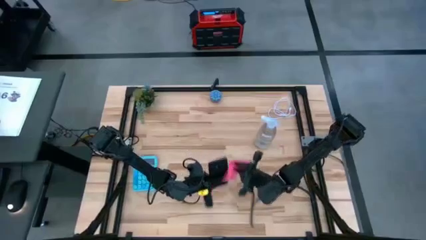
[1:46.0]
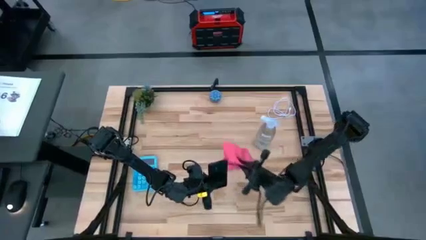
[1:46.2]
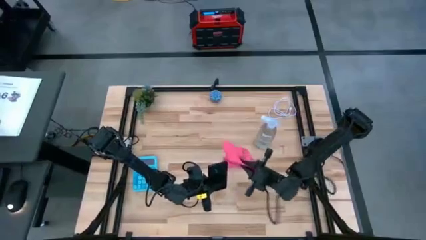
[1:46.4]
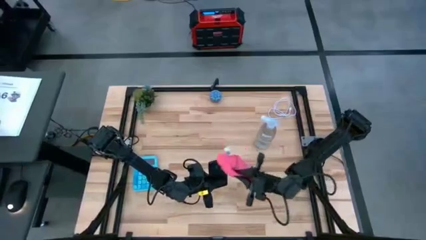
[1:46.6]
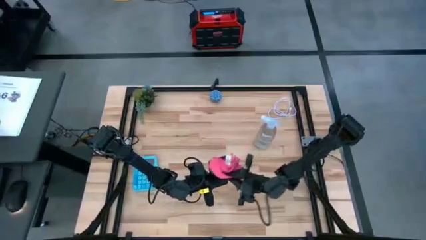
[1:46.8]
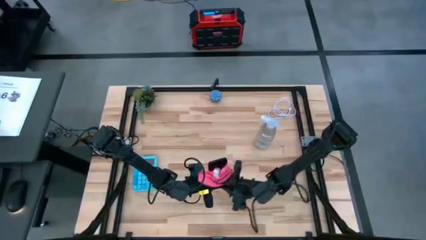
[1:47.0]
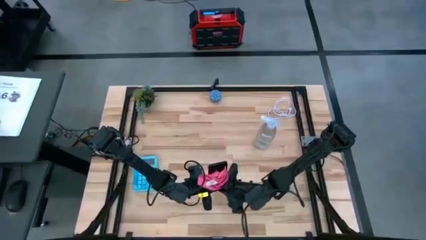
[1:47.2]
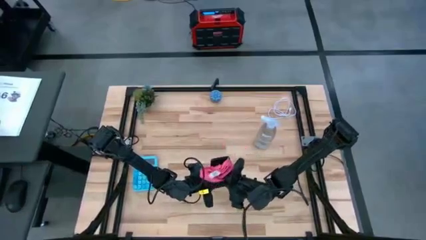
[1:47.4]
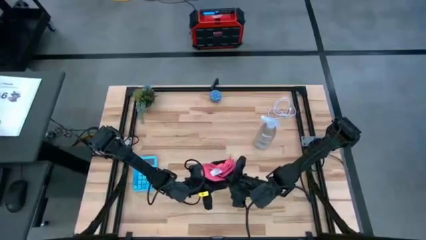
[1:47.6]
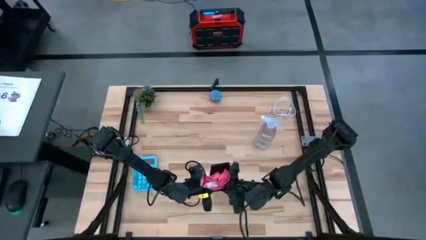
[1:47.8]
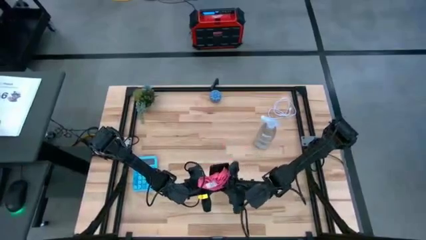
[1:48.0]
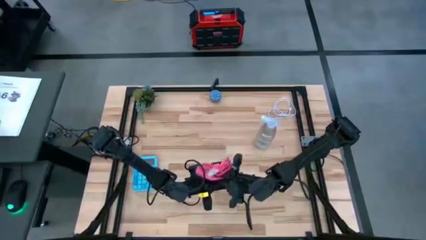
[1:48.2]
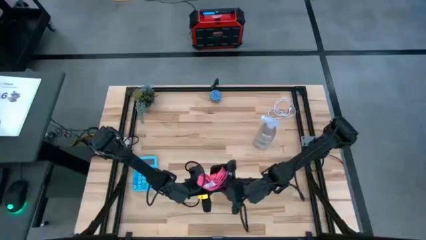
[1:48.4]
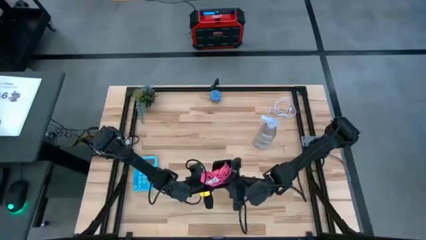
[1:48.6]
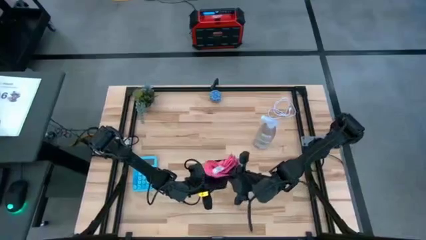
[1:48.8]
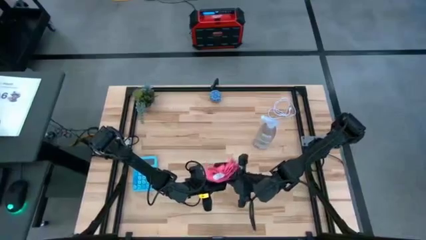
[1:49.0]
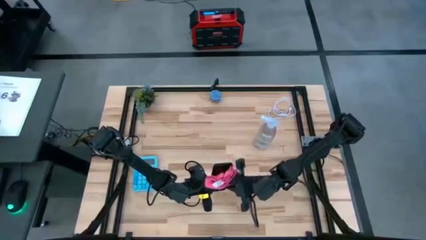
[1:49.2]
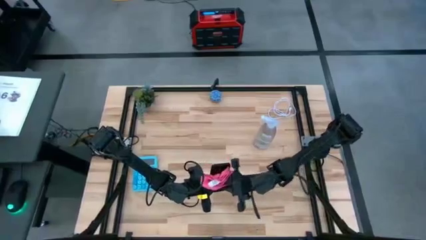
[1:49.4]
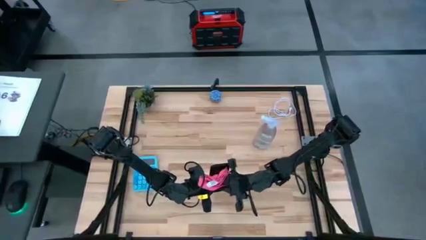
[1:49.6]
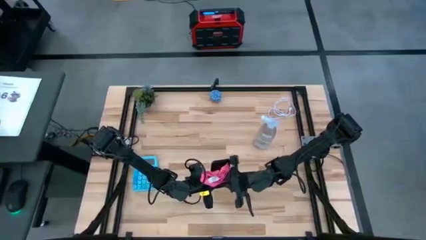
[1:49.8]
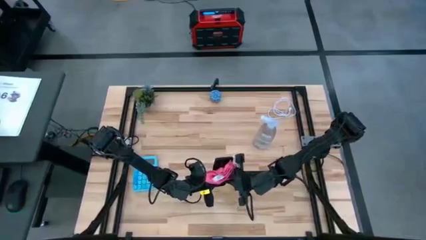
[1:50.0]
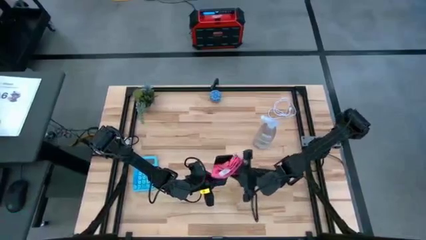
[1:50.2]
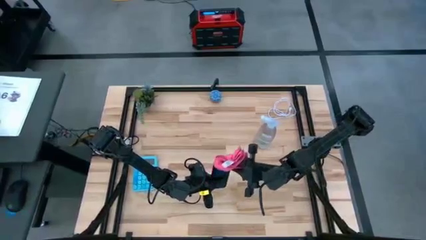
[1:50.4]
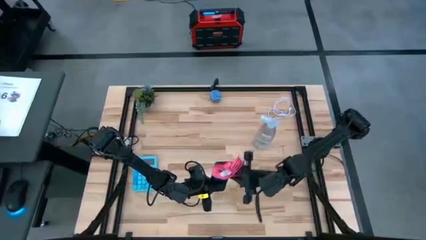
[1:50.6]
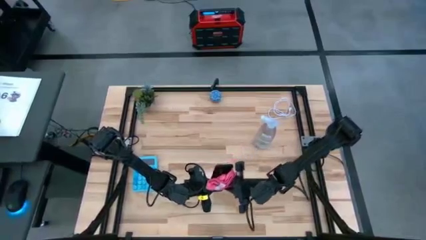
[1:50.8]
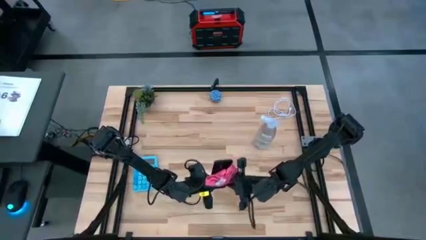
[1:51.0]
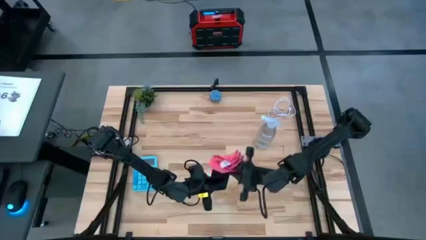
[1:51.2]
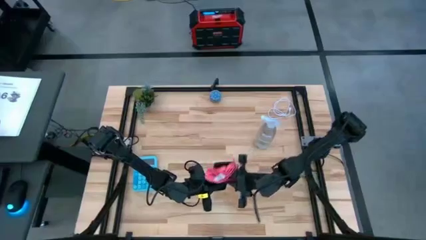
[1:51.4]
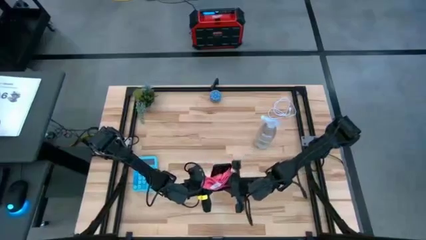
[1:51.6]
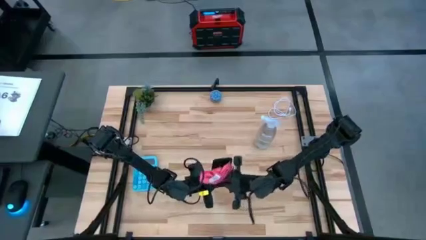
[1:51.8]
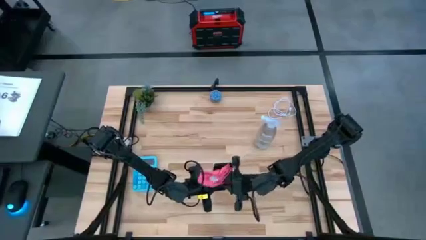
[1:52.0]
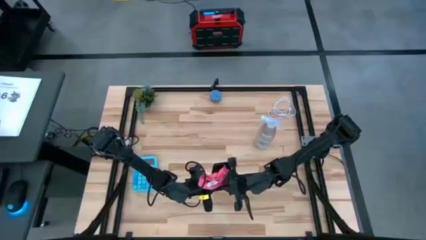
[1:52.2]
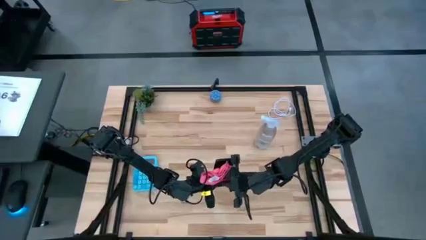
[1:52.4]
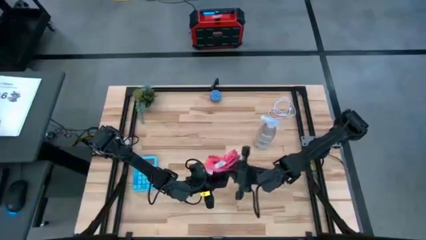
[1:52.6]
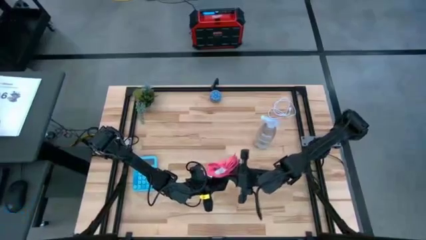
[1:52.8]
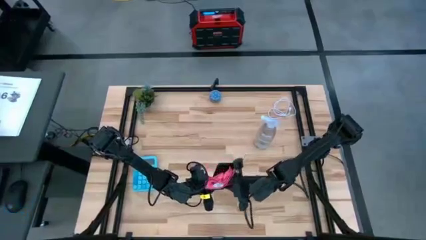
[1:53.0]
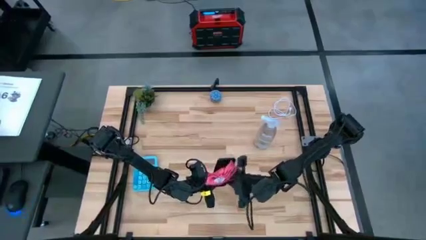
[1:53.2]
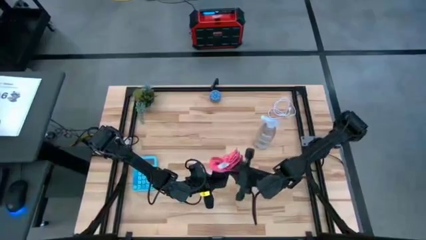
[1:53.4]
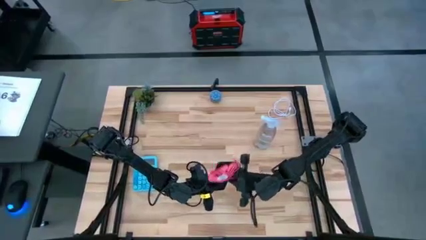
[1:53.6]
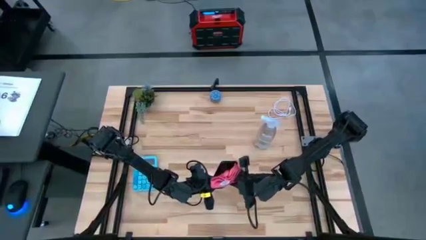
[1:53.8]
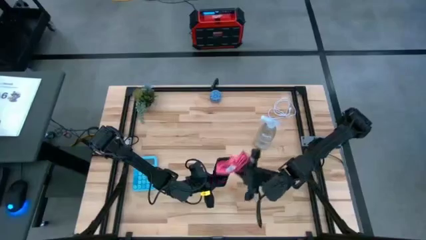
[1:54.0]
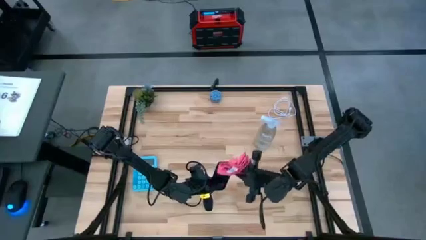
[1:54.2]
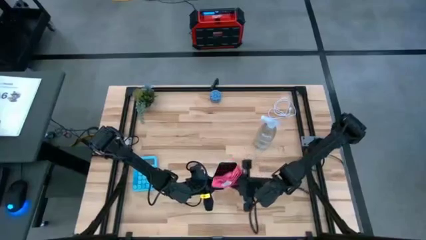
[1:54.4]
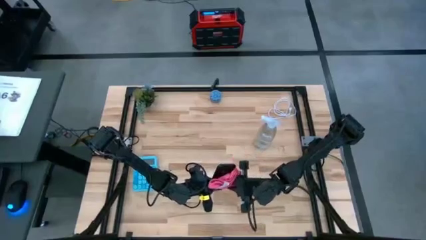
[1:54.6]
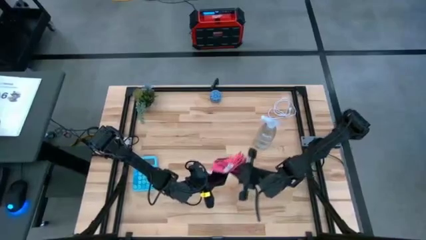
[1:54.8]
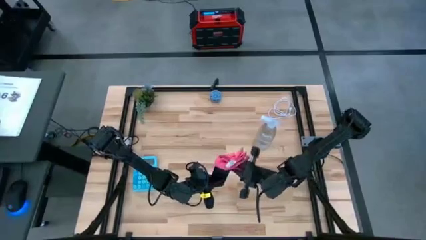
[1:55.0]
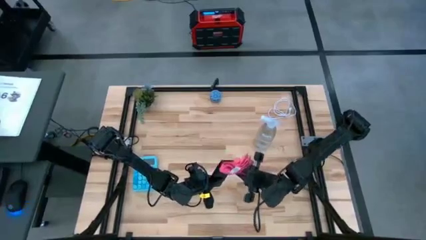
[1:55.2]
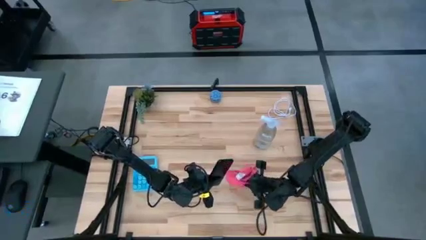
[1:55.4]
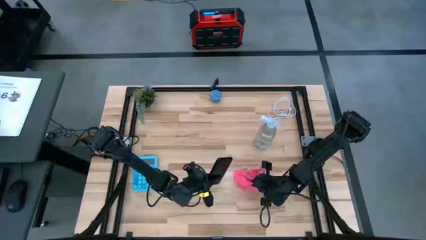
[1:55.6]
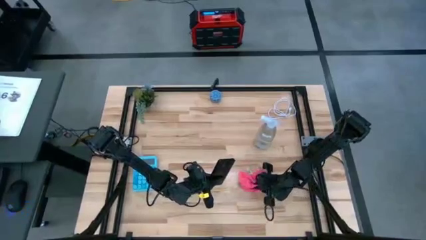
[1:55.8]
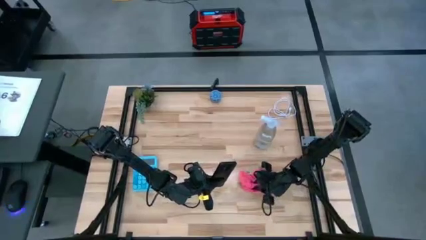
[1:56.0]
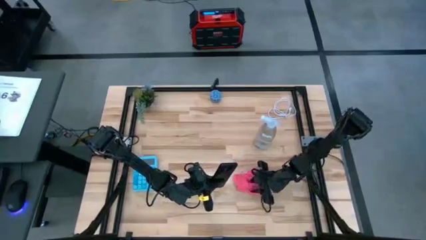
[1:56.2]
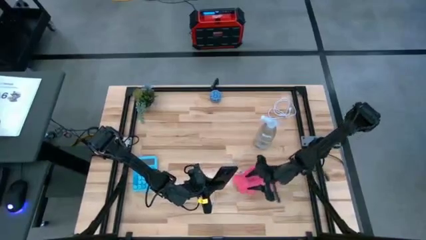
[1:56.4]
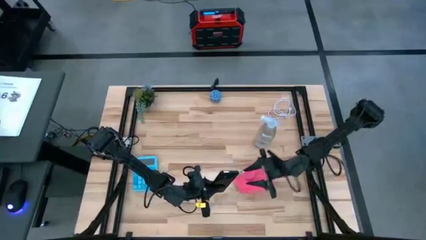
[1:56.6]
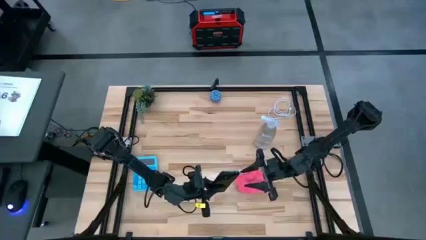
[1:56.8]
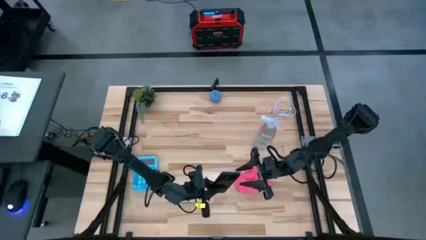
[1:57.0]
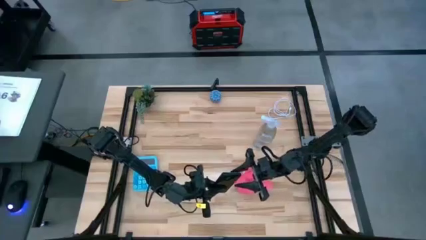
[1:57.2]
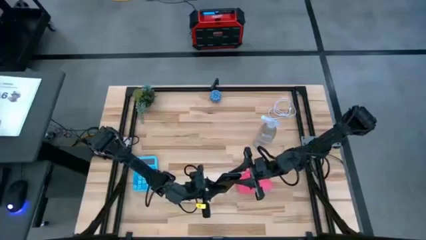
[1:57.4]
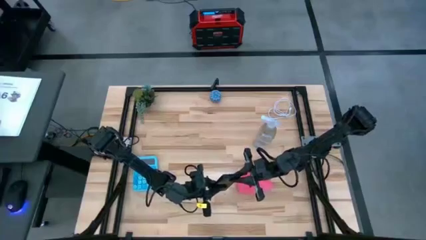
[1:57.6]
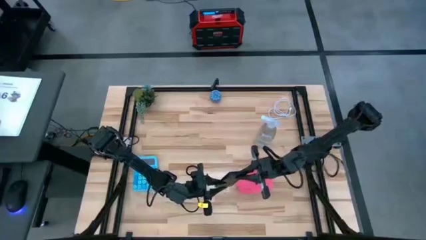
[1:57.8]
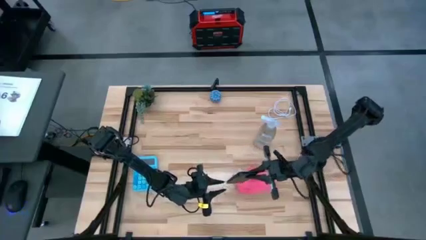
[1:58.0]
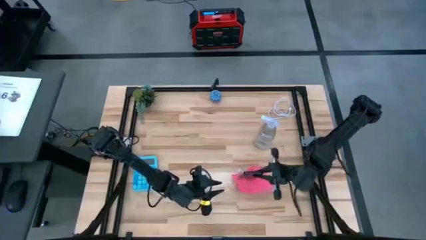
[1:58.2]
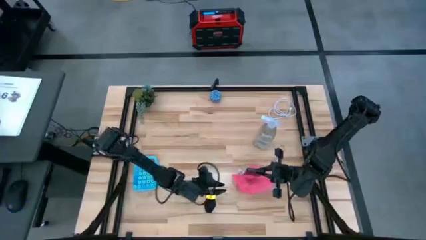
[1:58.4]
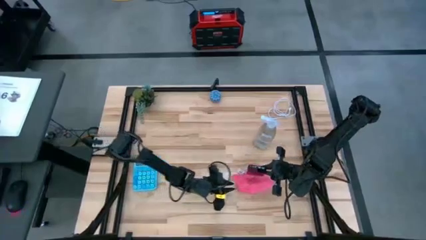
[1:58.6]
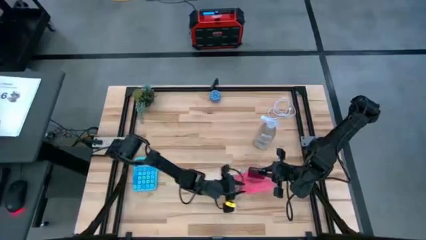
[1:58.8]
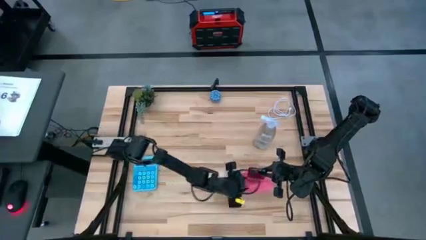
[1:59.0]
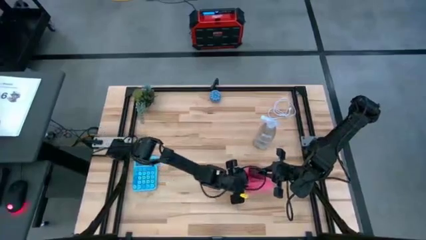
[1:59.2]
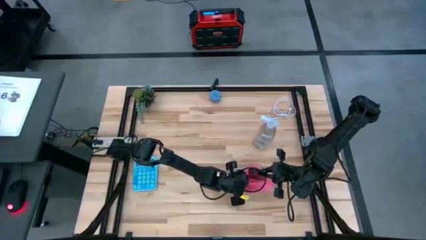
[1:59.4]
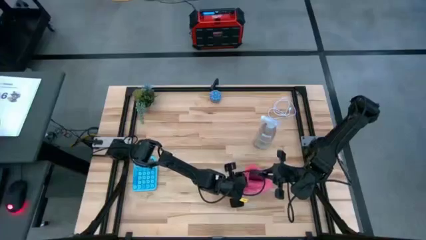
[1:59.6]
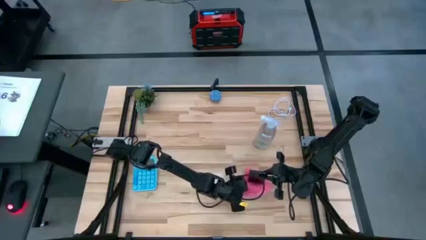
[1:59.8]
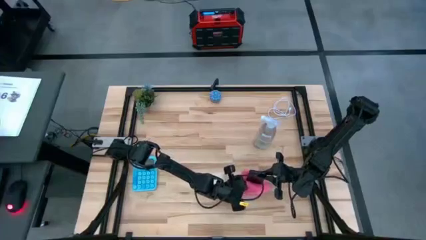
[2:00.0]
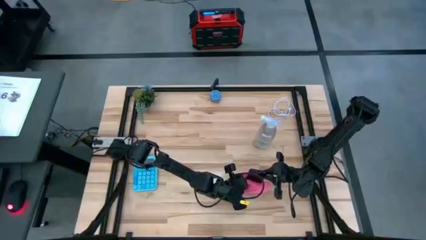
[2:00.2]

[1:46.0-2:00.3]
Task: Apply microfiber cloth
Wipe the black cellphone with the pink microfiber cloth
